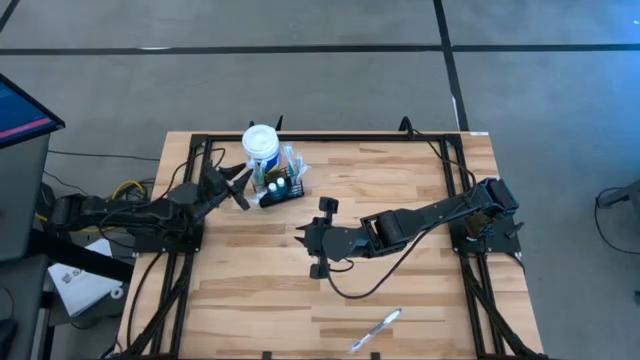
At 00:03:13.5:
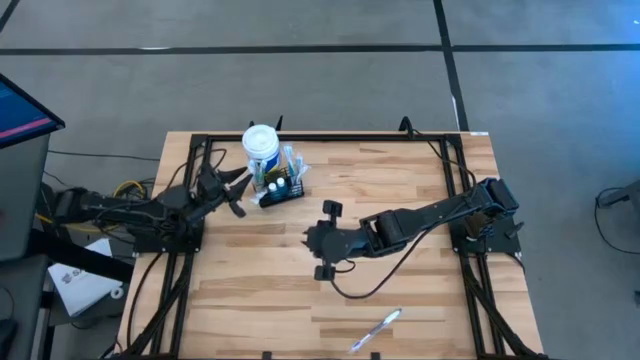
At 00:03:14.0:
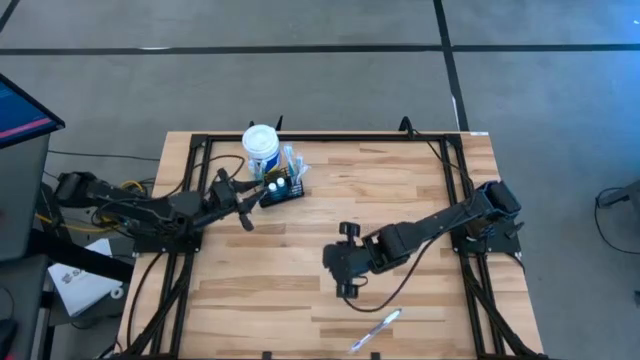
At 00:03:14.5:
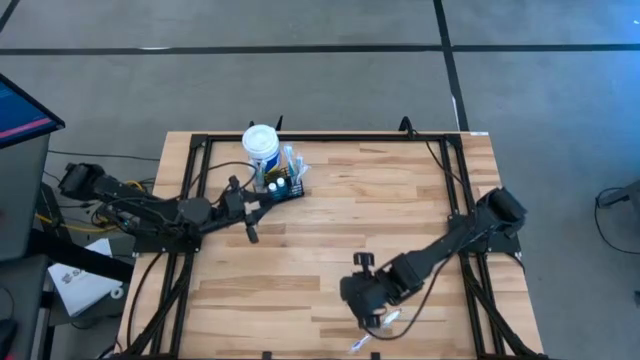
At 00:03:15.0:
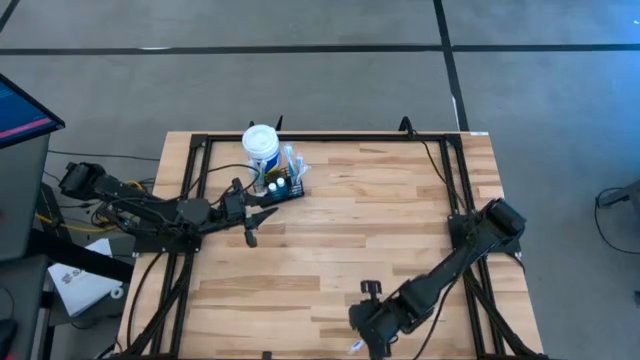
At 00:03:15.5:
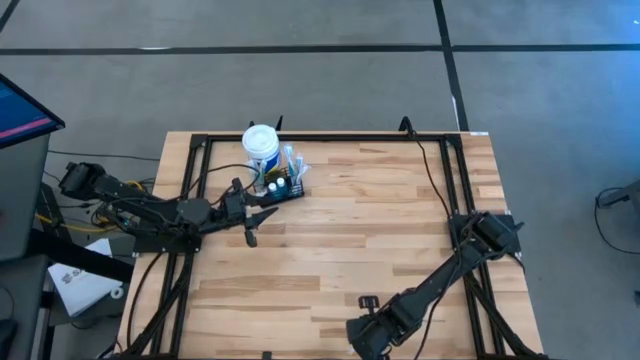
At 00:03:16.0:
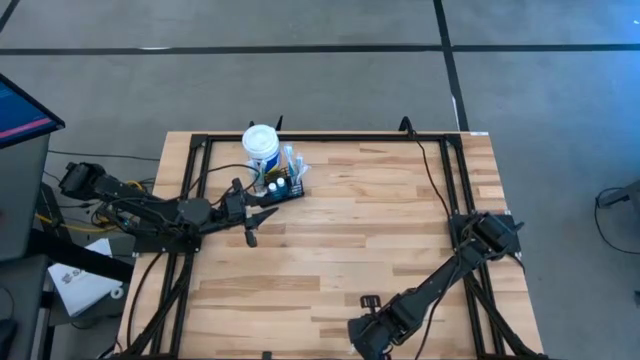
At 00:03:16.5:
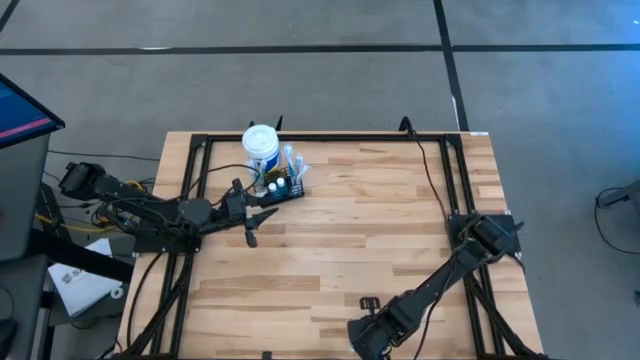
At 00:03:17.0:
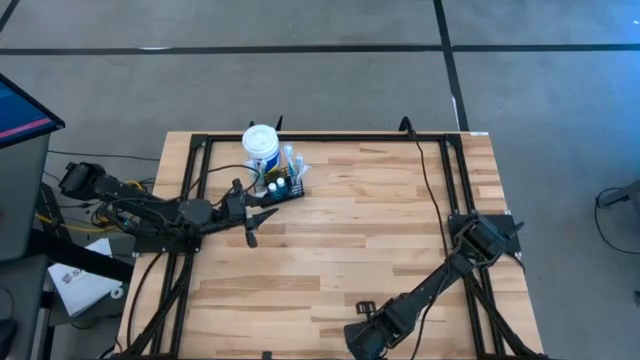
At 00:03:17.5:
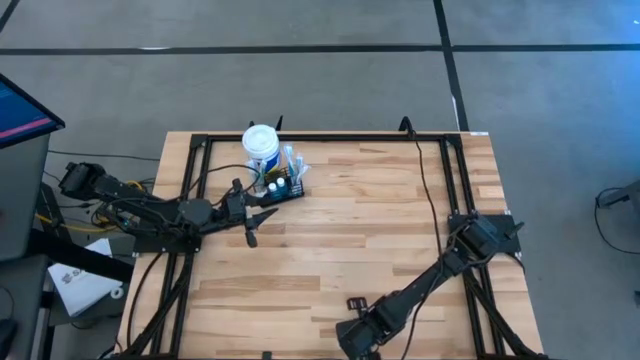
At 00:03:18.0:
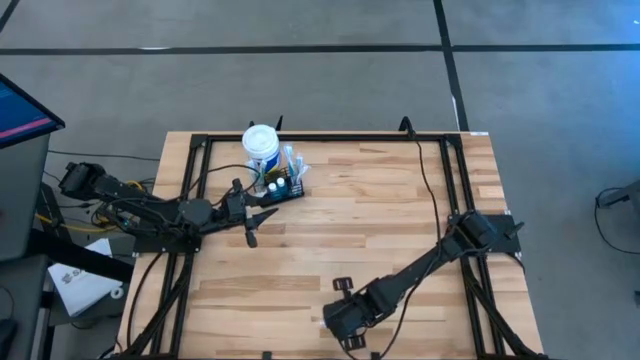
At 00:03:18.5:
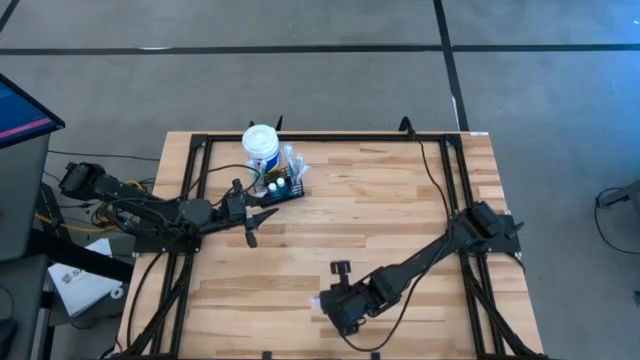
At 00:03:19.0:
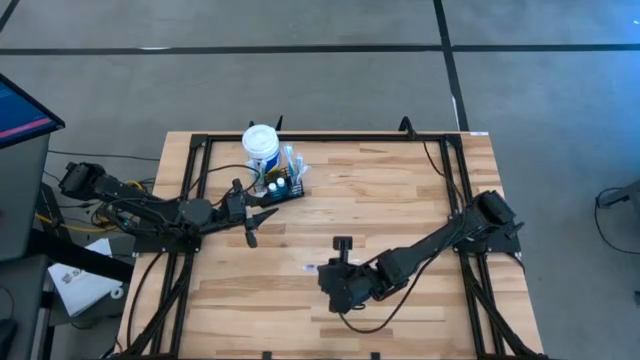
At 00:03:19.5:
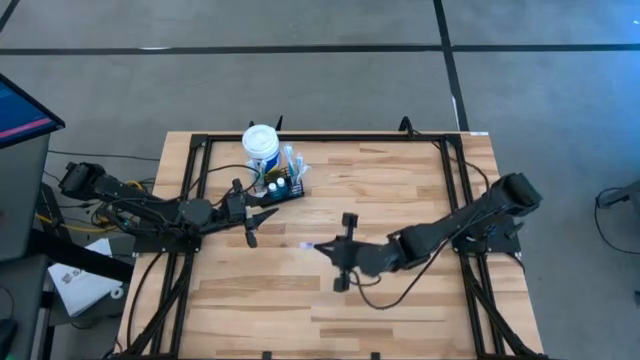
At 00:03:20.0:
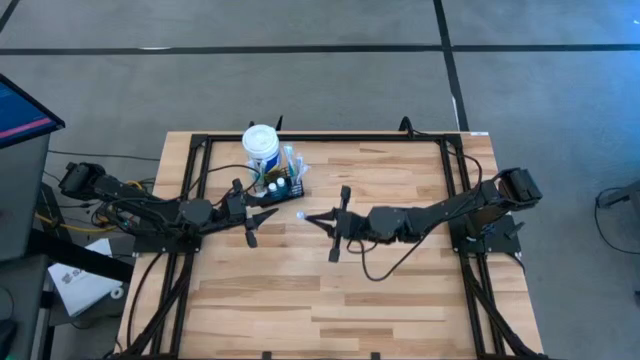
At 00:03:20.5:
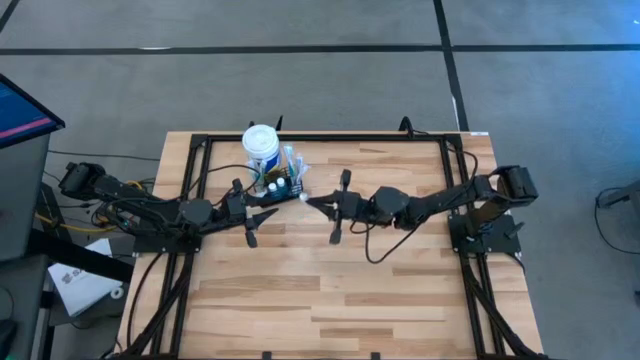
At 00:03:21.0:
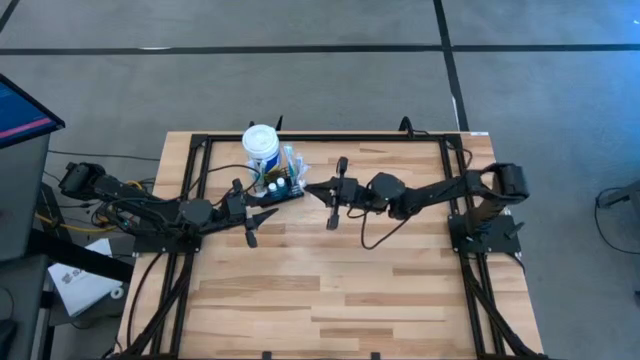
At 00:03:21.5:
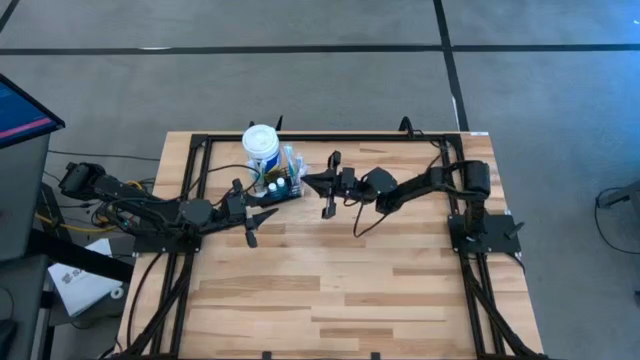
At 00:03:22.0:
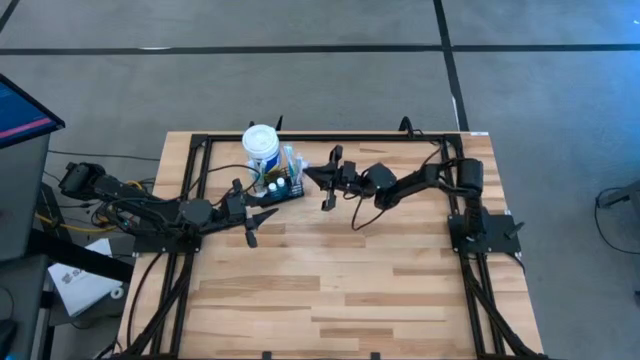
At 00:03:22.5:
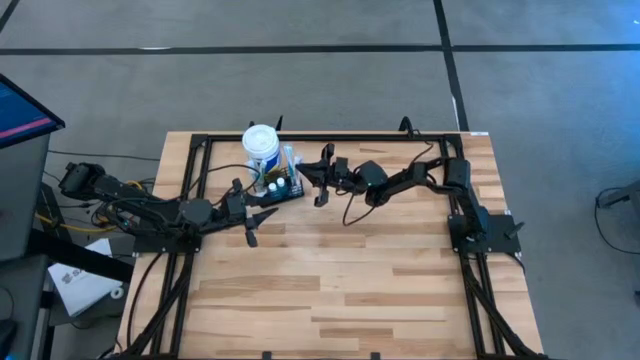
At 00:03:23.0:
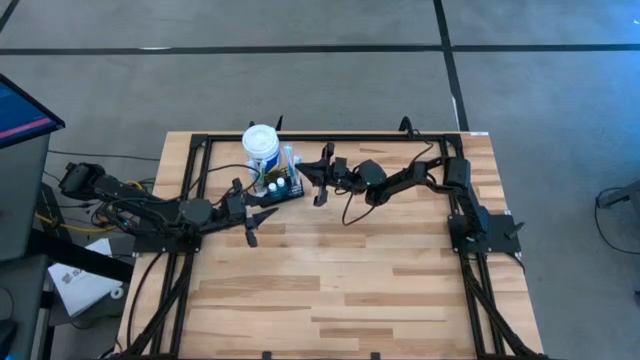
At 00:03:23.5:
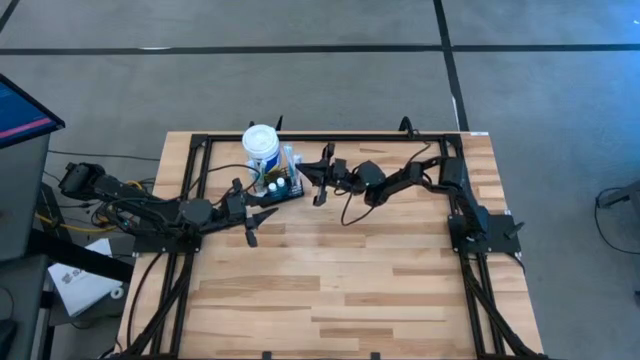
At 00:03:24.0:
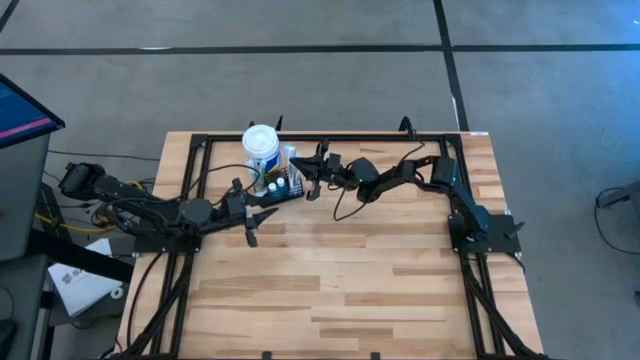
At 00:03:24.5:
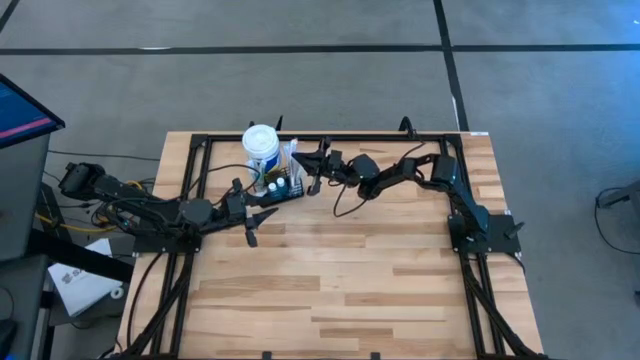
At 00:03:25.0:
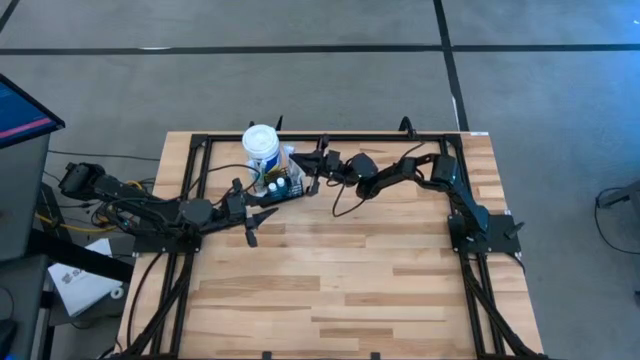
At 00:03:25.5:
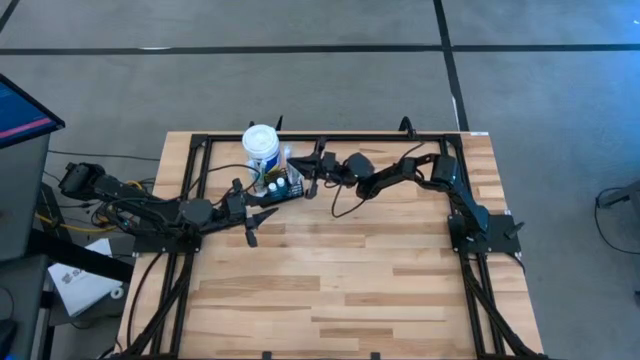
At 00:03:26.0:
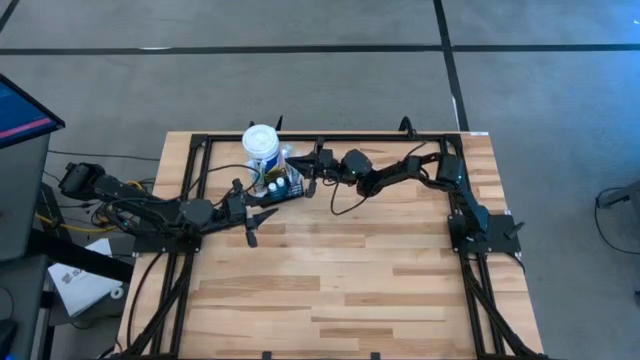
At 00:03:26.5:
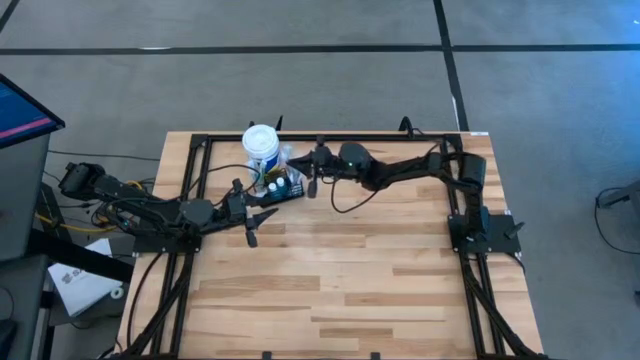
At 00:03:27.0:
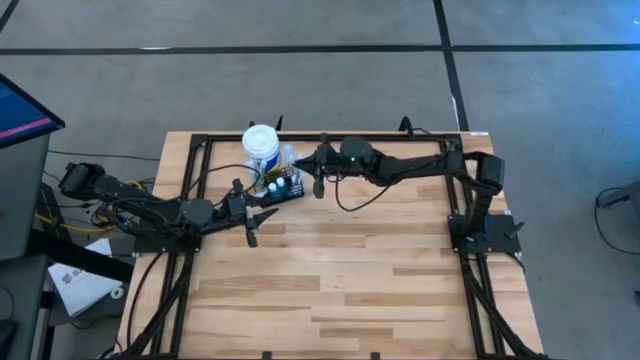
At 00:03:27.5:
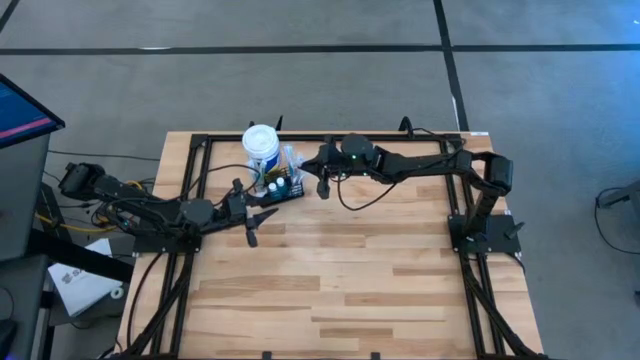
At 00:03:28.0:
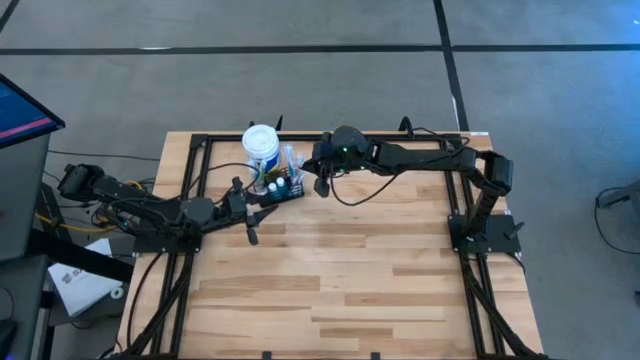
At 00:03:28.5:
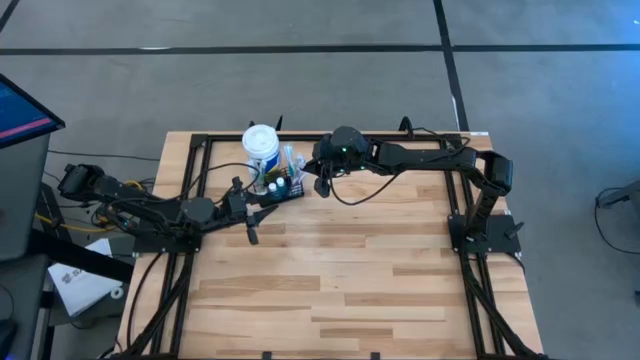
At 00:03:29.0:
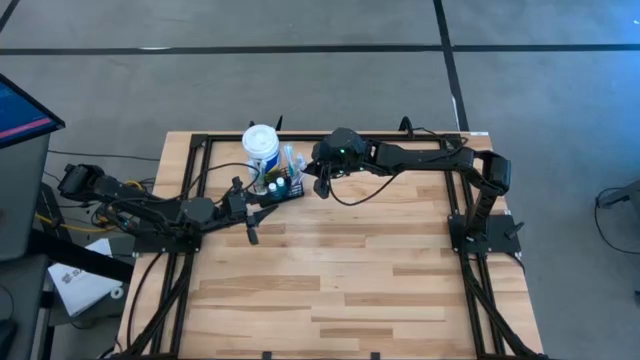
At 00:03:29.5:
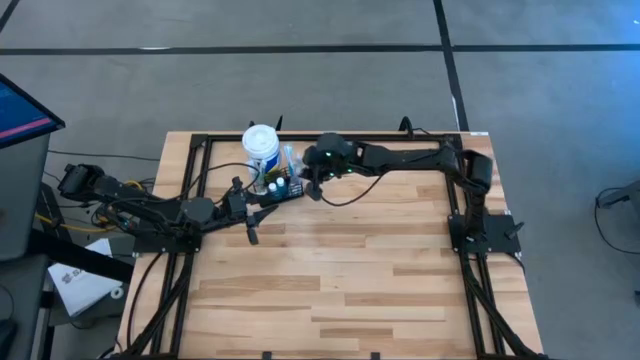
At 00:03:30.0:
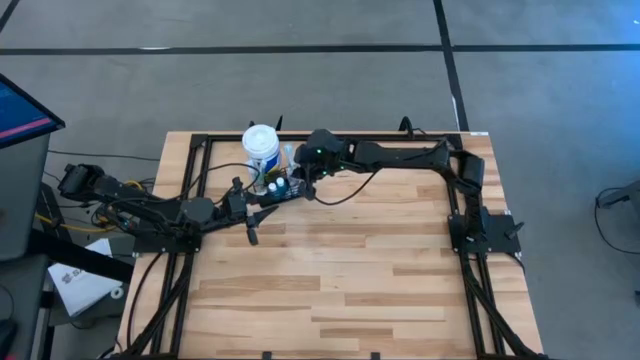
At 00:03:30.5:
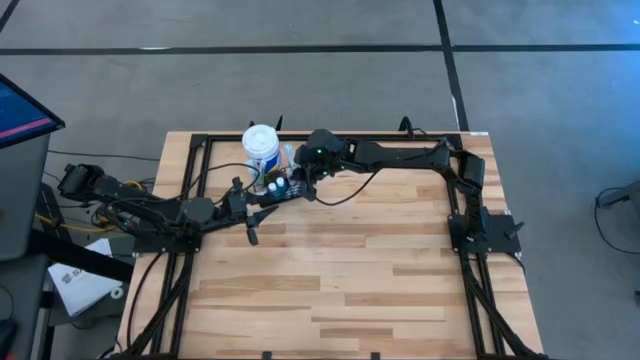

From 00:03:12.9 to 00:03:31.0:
Task: Pick & Place toothbrushing station
Put the purple toothbrush into the wire organizer

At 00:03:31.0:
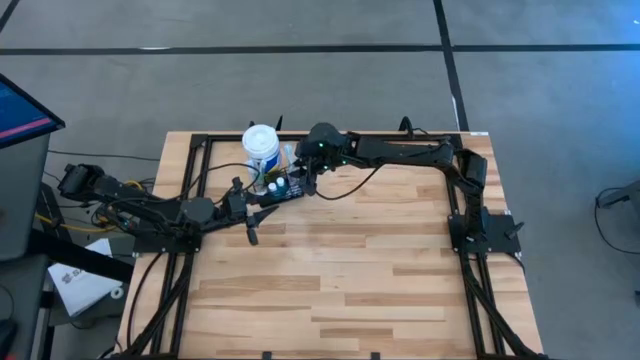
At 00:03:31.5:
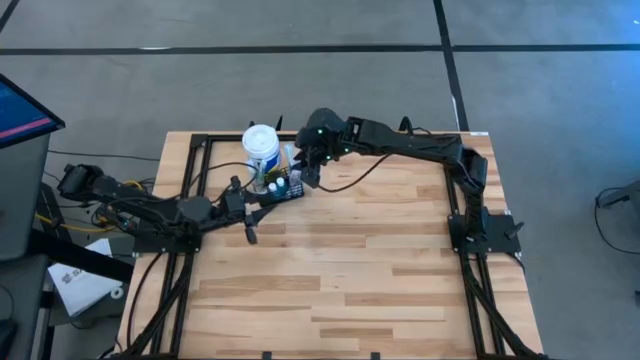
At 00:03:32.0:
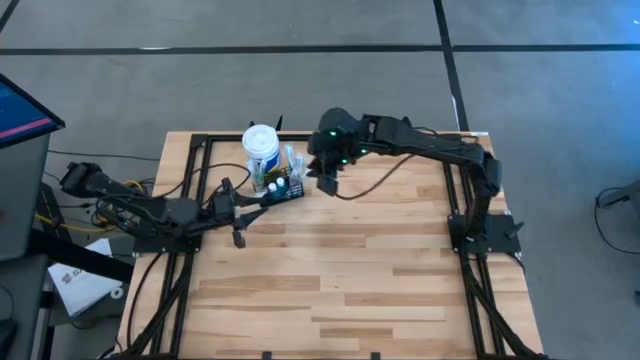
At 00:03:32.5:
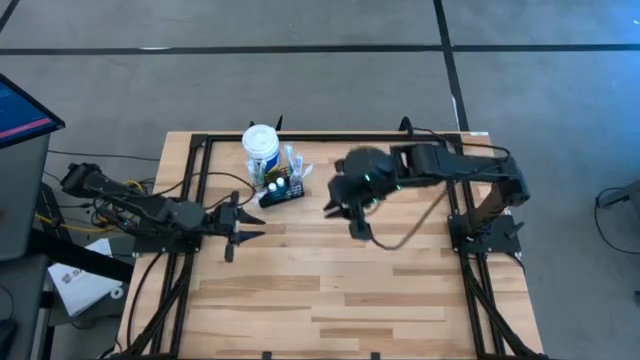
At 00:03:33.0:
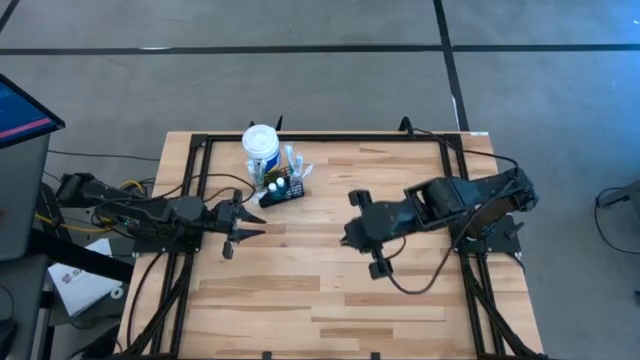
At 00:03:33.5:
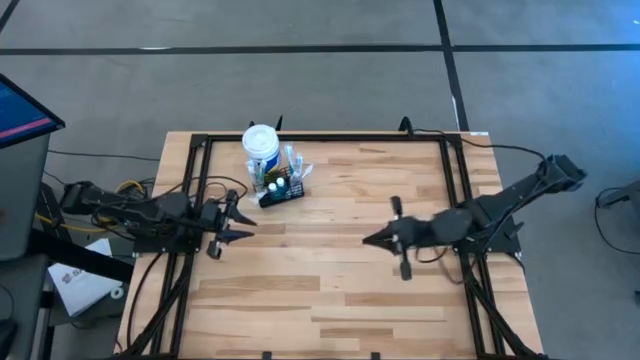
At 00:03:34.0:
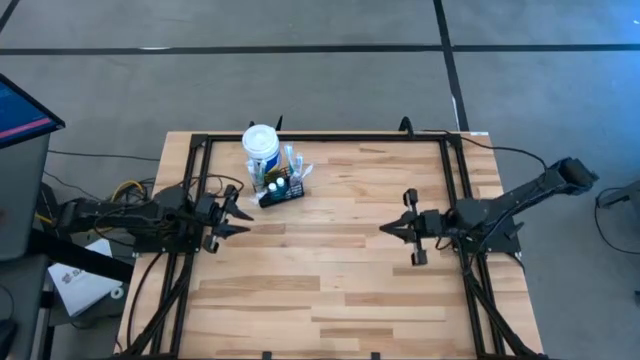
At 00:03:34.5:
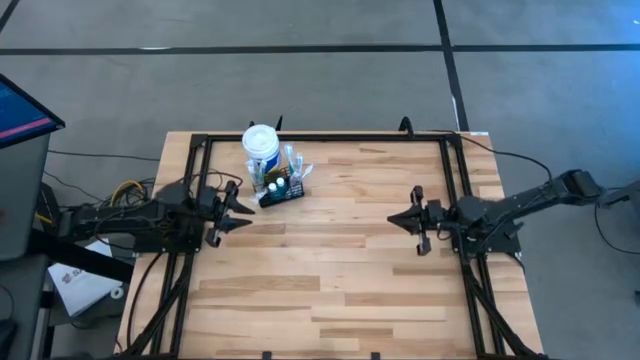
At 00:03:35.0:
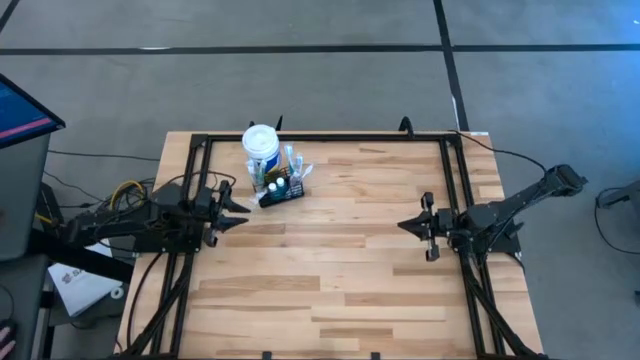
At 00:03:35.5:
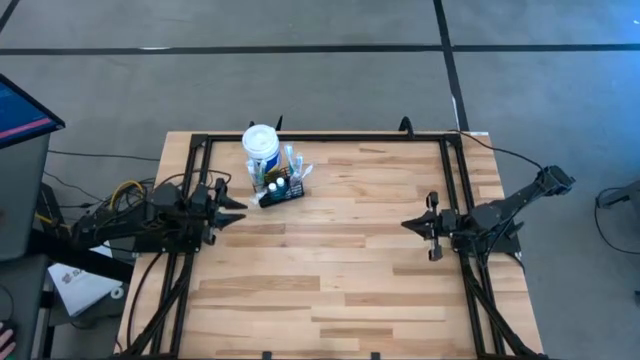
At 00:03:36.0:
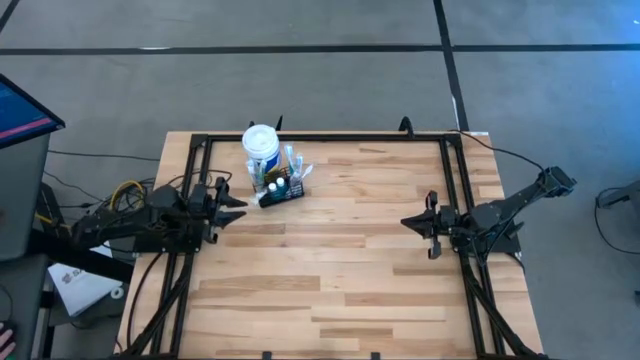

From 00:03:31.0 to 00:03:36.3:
Return to Home Position
